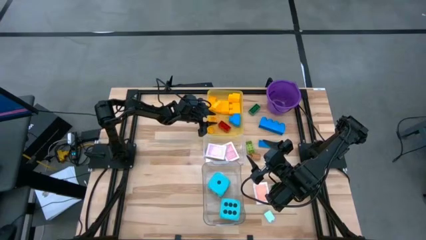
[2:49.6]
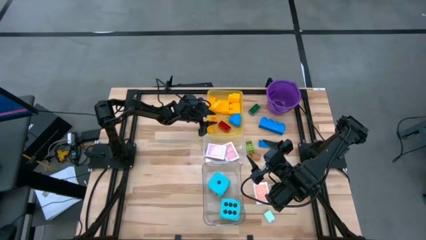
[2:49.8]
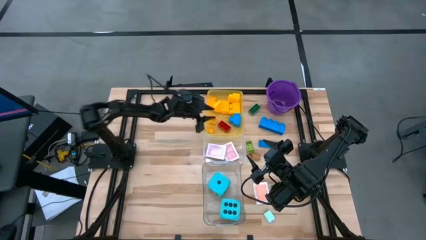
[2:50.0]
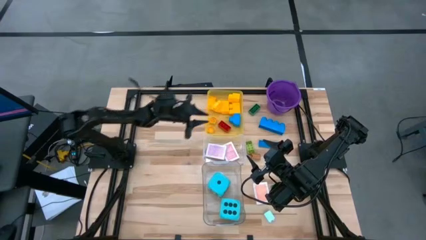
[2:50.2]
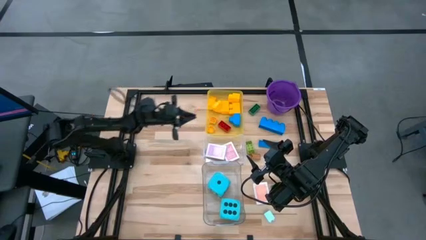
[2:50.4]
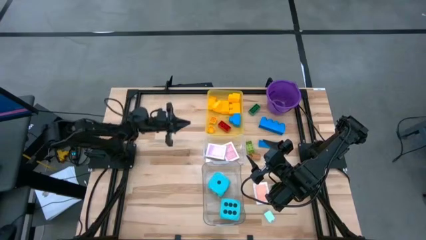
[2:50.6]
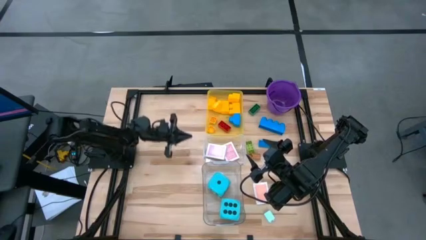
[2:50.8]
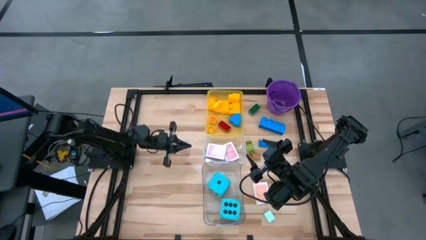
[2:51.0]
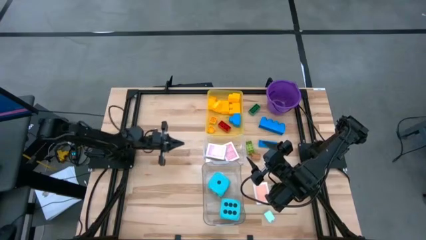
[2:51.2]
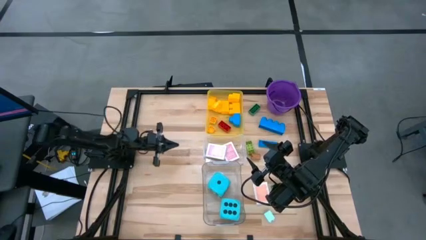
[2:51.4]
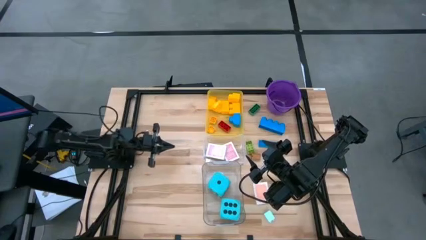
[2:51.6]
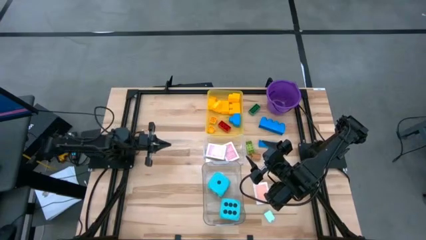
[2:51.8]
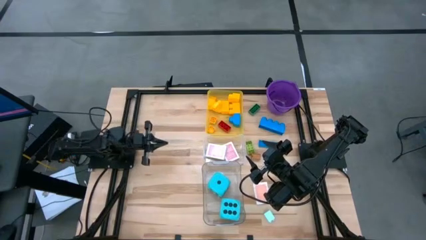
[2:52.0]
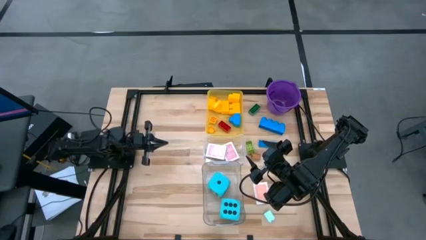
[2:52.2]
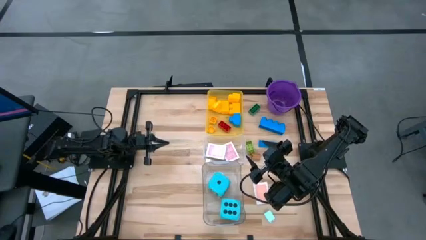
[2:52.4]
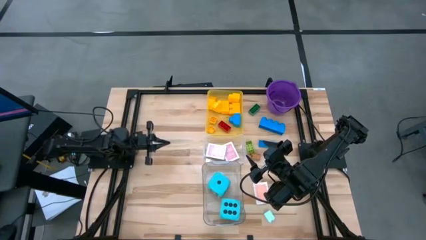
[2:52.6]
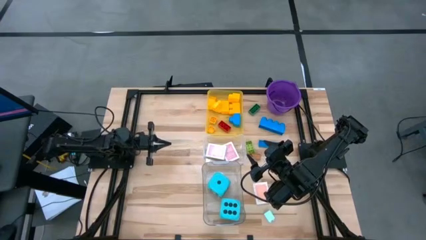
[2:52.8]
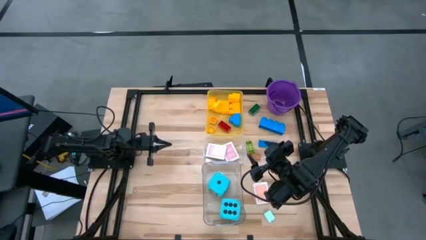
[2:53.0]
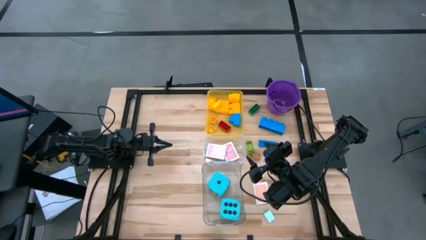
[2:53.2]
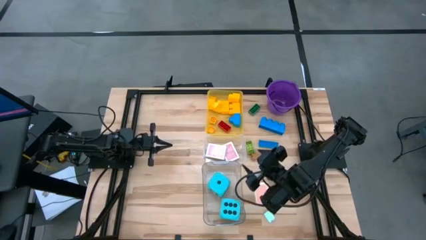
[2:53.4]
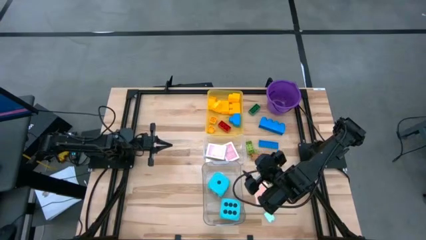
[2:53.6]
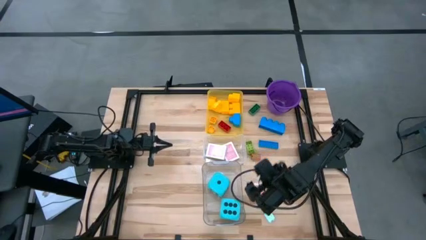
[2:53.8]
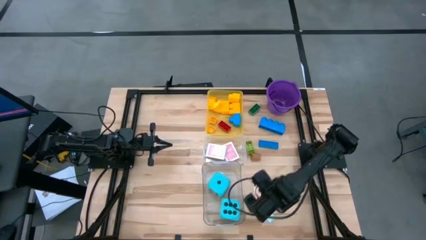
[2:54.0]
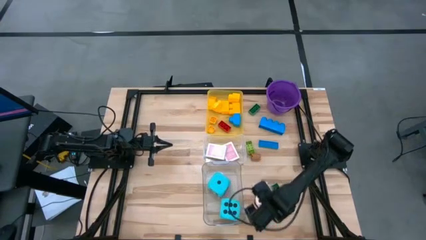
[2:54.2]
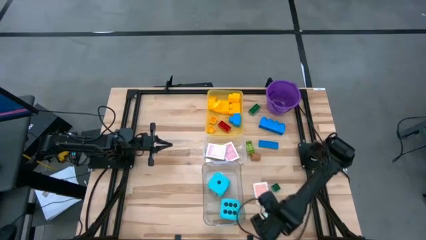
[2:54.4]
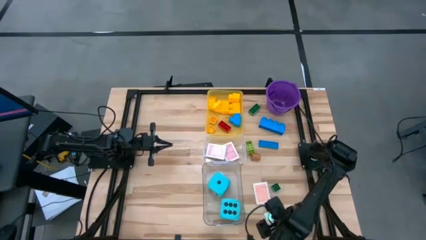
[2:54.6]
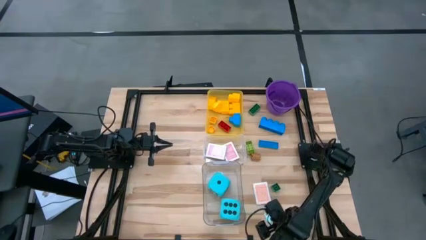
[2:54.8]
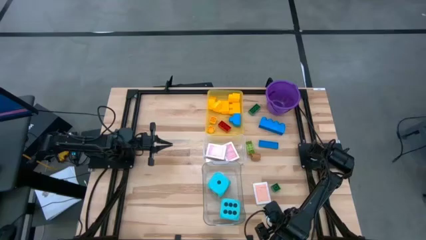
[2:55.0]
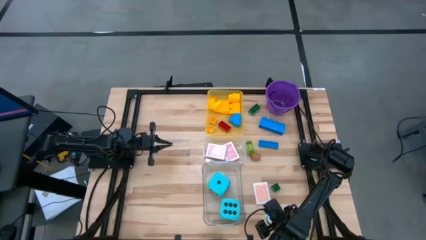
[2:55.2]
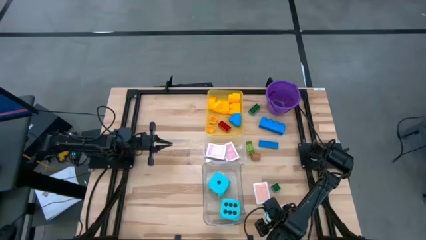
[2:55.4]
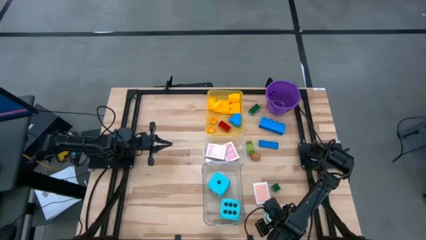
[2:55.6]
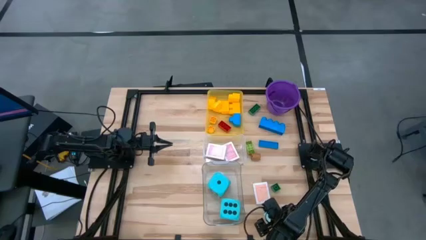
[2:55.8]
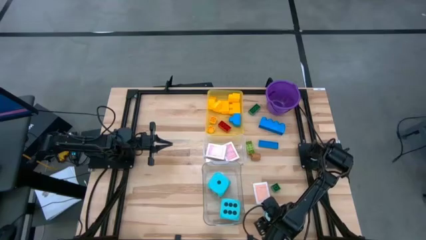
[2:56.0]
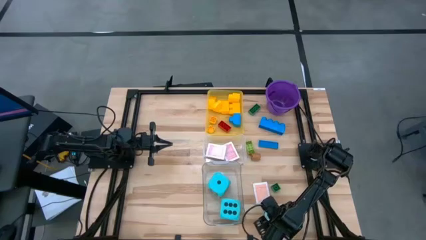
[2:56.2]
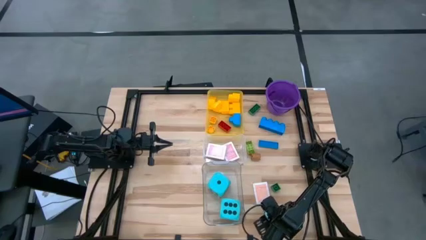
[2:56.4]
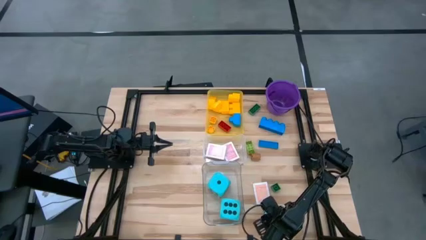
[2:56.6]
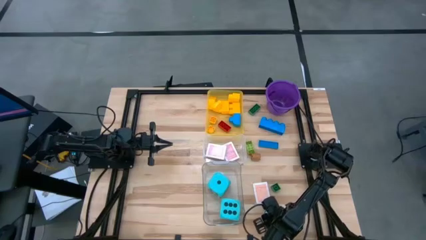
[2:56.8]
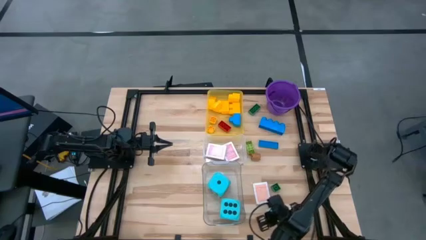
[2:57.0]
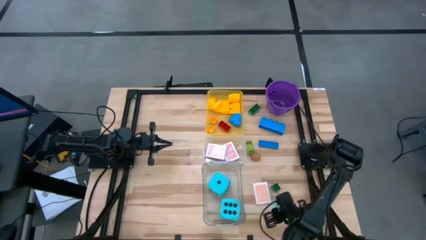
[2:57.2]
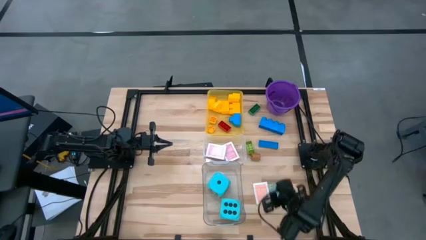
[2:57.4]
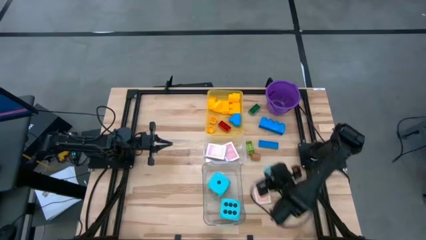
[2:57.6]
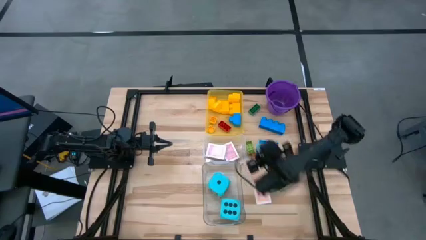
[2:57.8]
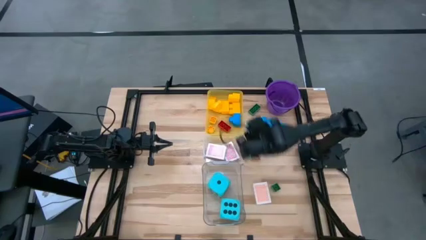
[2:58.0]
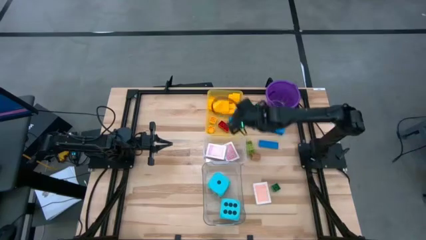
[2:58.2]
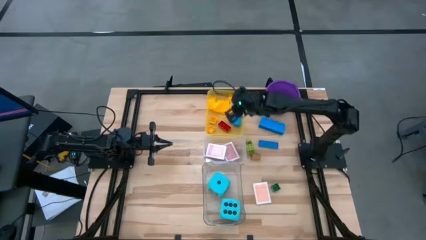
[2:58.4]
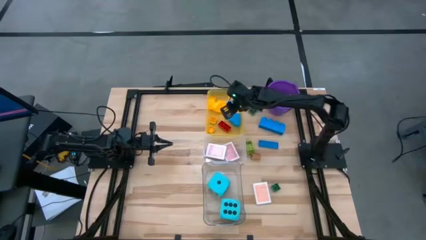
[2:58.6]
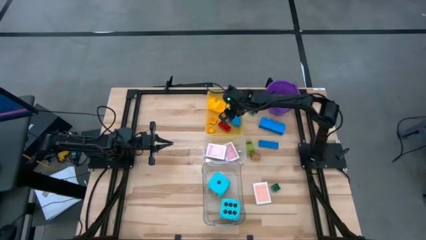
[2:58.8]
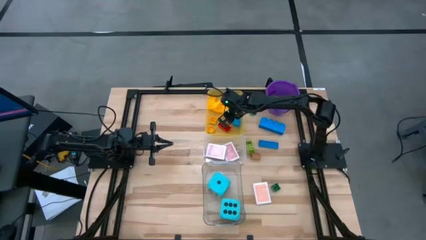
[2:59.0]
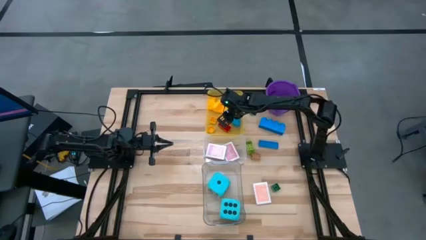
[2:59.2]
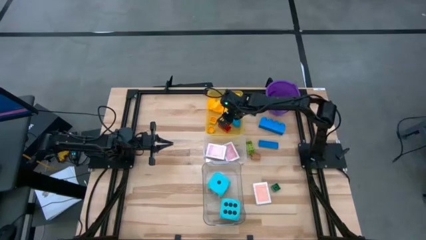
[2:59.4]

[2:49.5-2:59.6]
Task: Pick & Place Toys
Put the light blue game piece into the yellow bin

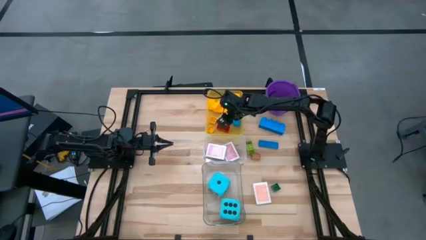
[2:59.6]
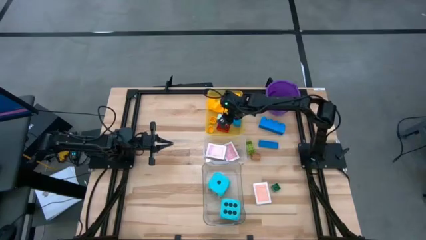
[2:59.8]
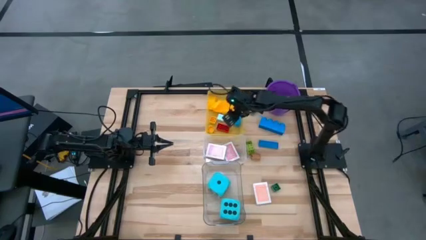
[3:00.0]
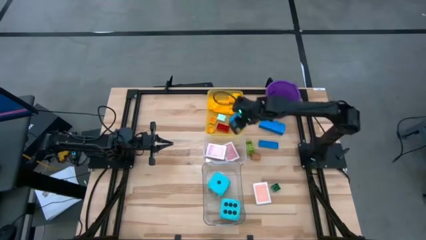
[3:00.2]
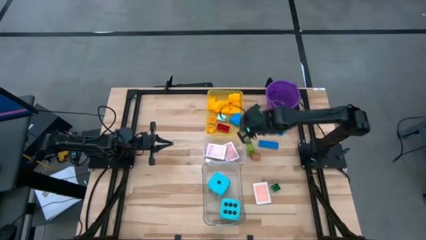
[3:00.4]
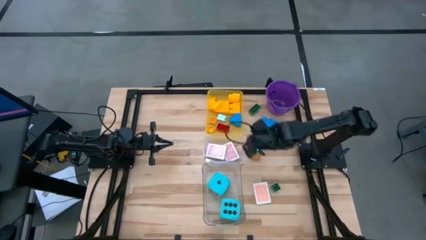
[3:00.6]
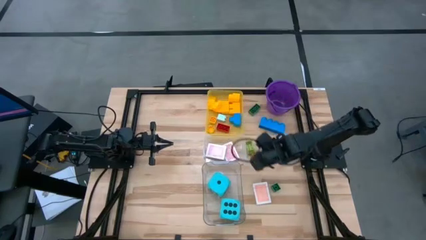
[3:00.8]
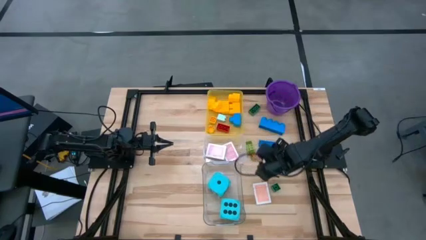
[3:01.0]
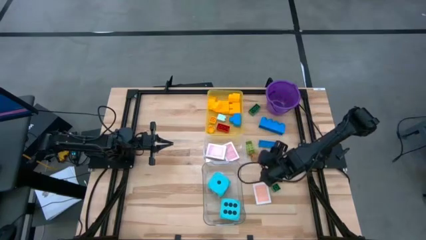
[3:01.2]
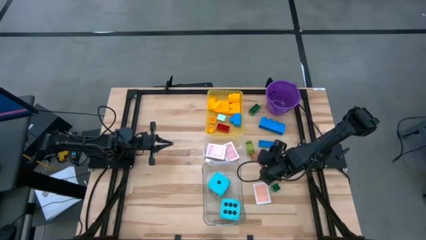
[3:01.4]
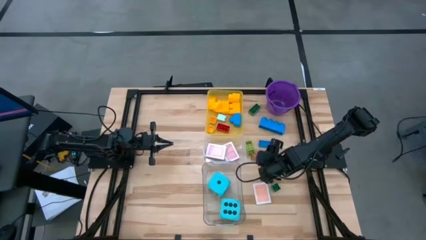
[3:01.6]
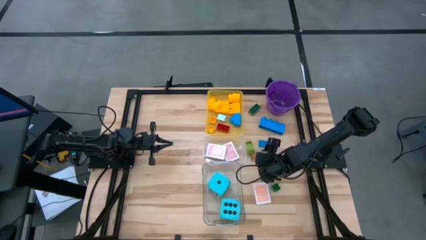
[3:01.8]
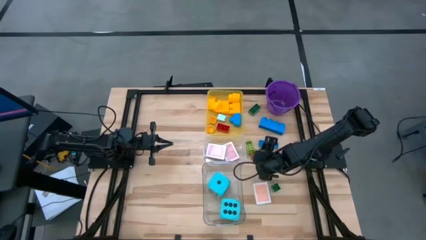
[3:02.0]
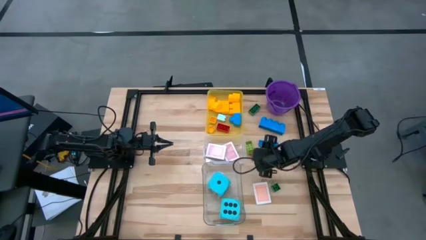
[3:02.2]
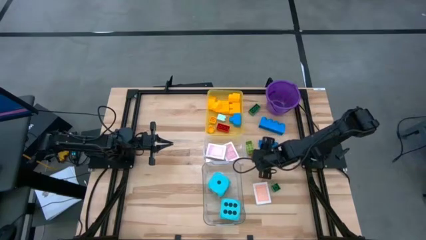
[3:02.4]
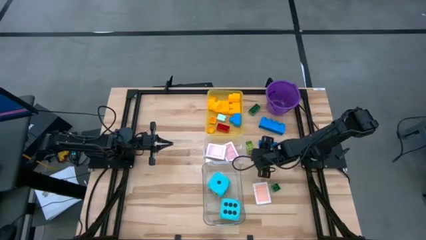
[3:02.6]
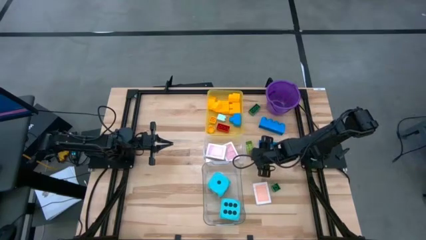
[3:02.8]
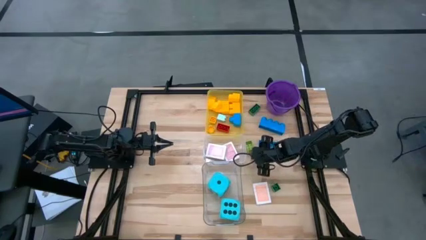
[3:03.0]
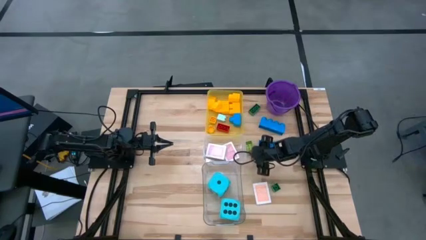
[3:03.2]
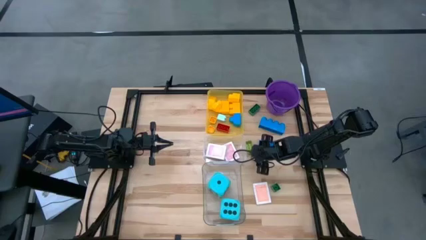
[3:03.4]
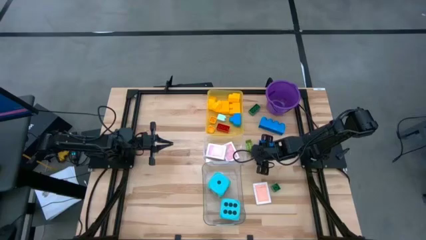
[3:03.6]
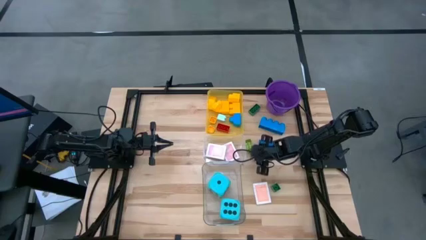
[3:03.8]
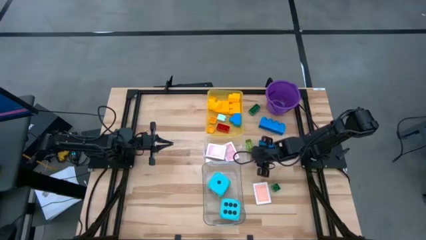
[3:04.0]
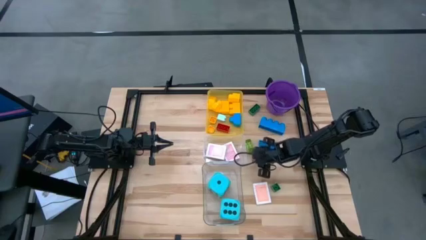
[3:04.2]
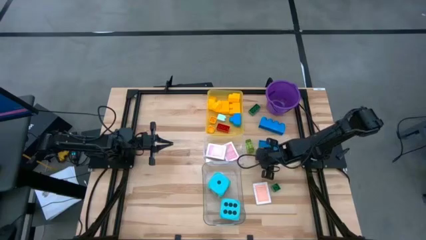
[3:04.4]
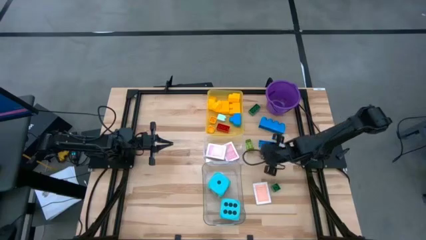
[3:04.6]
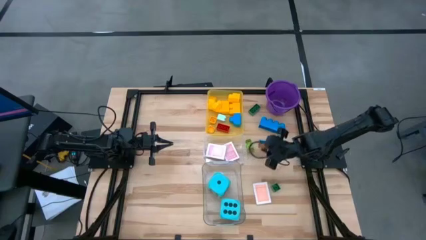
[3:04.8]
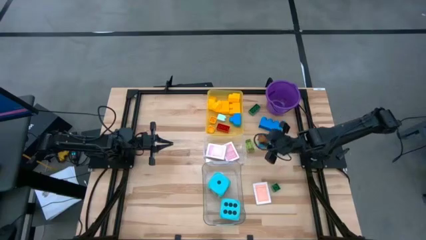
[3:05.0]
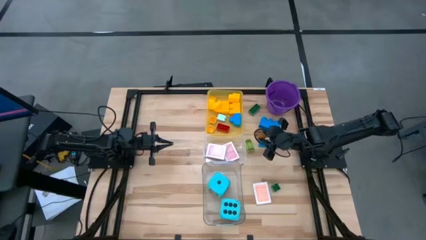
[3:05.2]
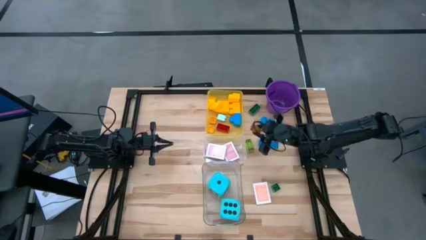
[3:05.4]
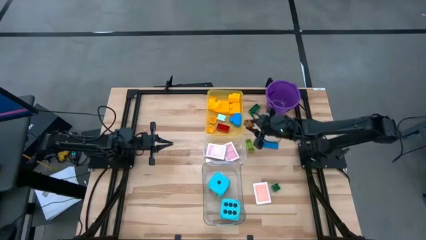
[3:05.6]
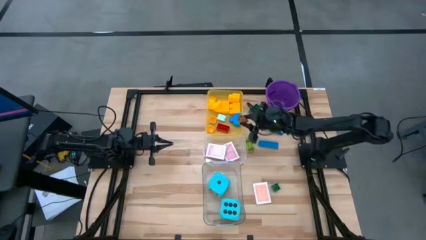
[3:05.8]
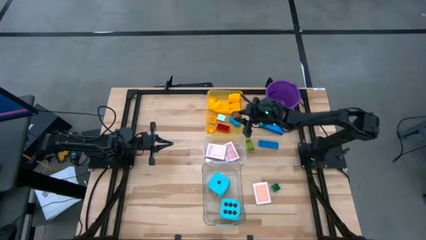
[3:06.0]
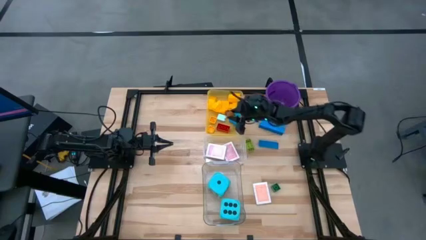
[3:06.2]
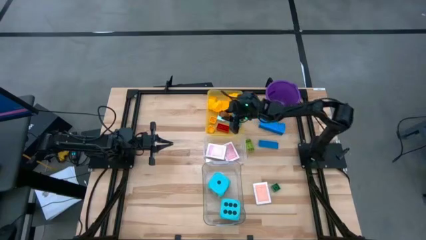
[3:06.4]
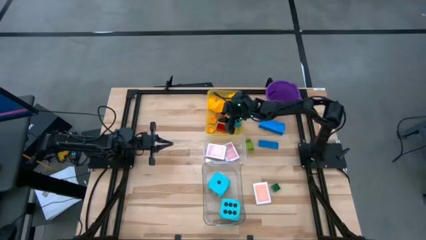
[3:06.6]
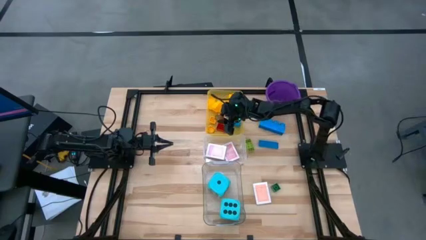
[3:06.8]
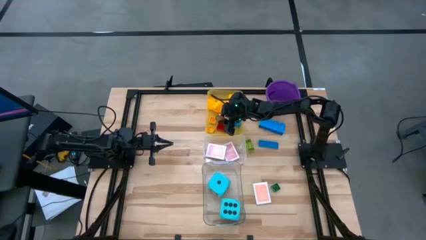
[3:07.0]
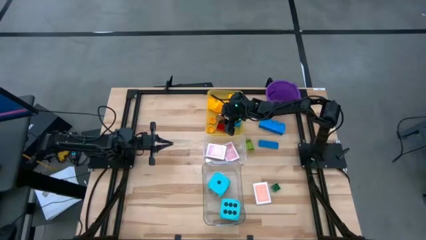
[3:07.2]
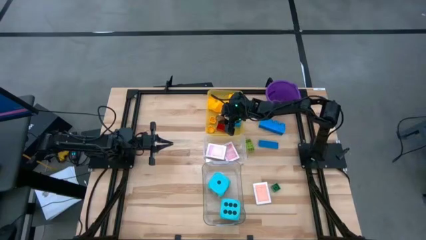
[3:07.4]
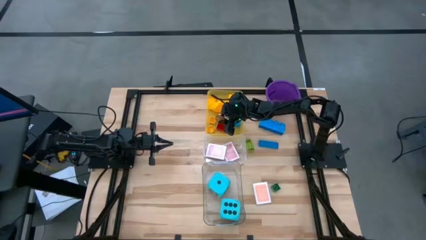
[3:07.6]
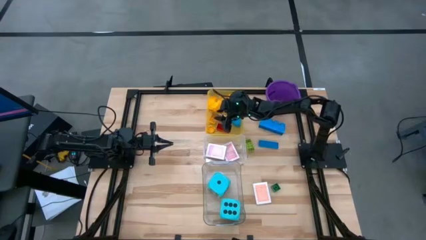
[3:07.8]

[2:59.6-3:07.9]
Put the brown game piece into the yellow bin
